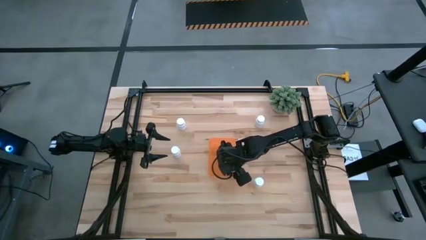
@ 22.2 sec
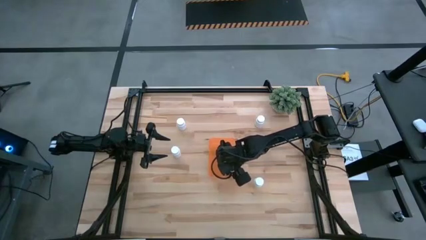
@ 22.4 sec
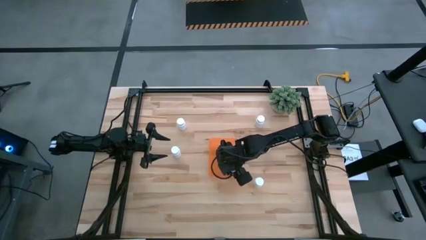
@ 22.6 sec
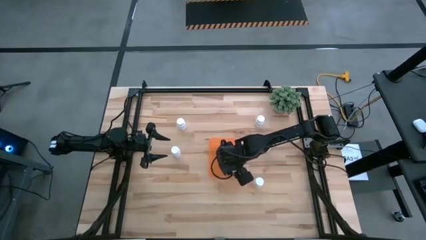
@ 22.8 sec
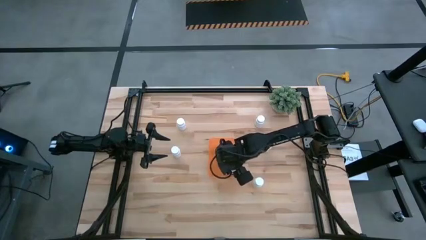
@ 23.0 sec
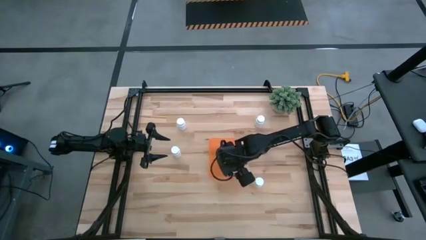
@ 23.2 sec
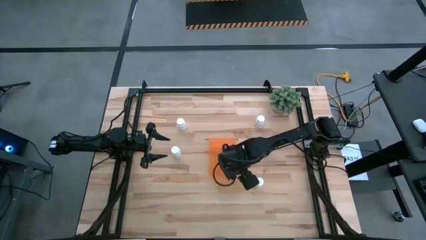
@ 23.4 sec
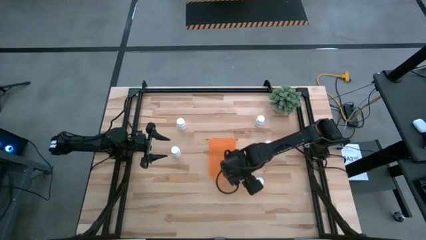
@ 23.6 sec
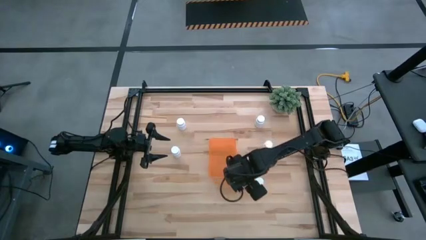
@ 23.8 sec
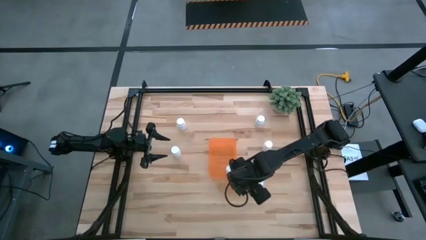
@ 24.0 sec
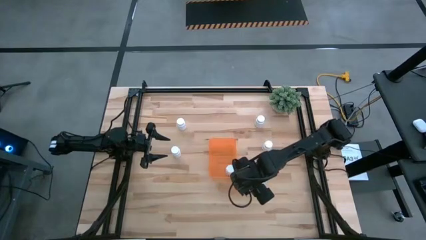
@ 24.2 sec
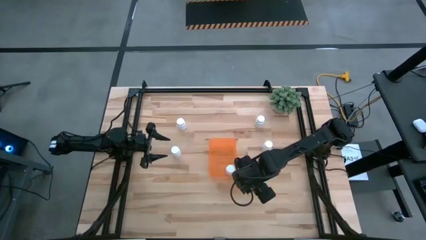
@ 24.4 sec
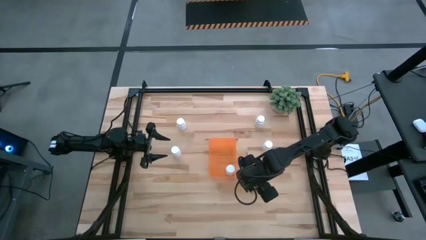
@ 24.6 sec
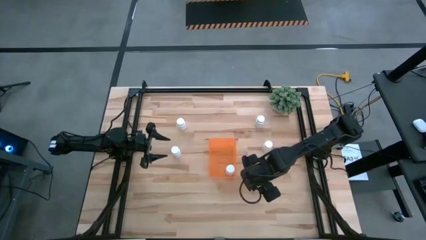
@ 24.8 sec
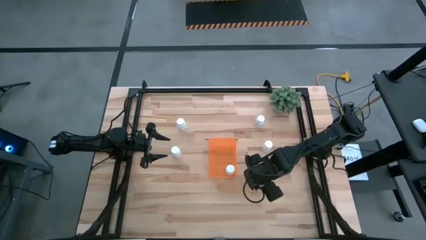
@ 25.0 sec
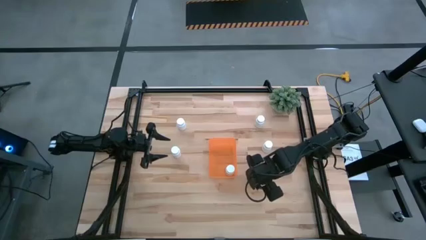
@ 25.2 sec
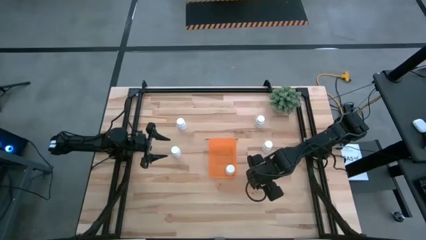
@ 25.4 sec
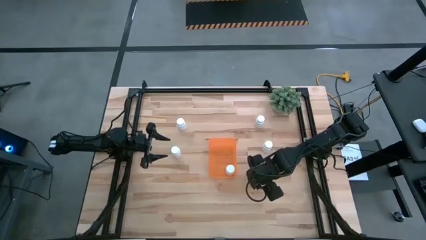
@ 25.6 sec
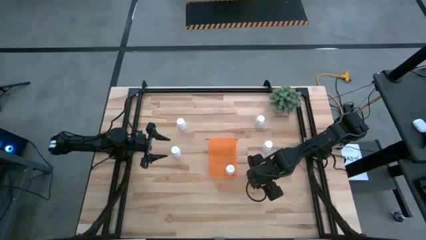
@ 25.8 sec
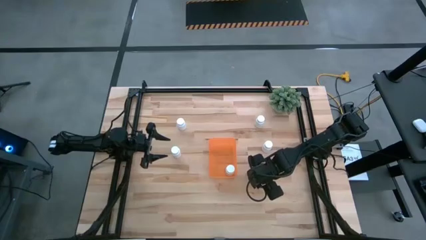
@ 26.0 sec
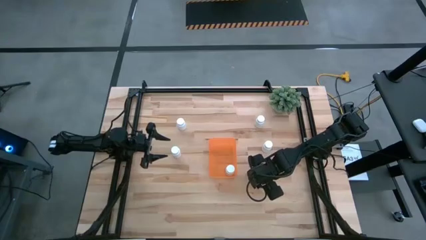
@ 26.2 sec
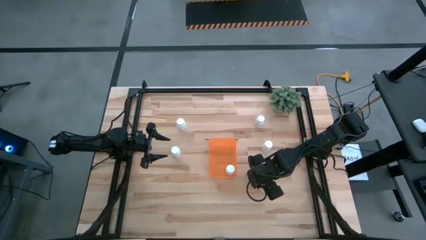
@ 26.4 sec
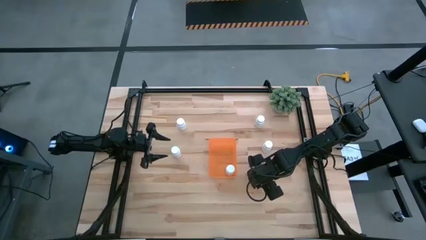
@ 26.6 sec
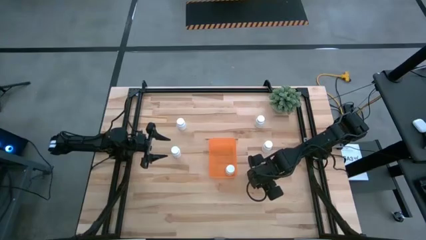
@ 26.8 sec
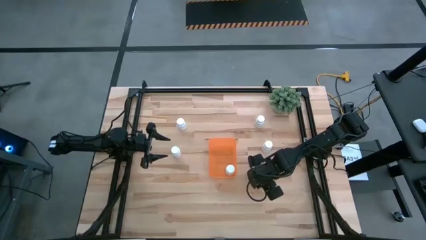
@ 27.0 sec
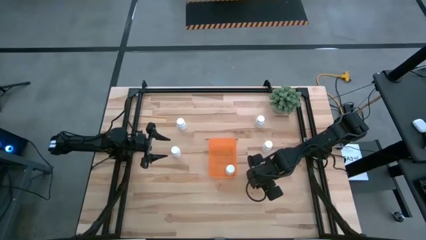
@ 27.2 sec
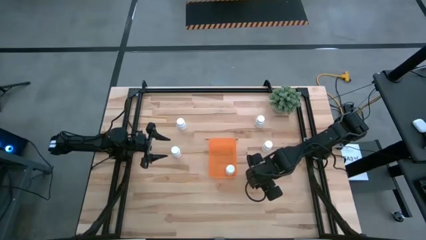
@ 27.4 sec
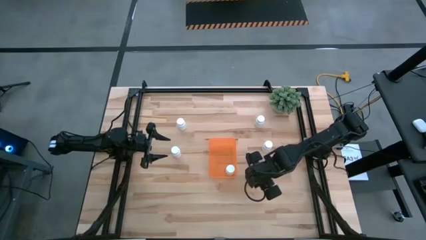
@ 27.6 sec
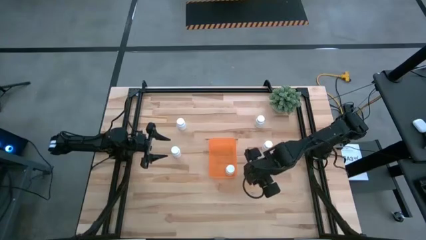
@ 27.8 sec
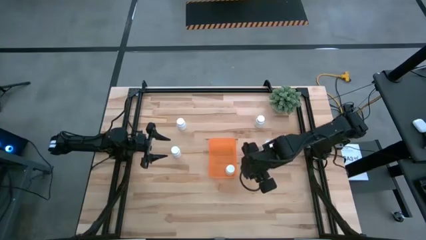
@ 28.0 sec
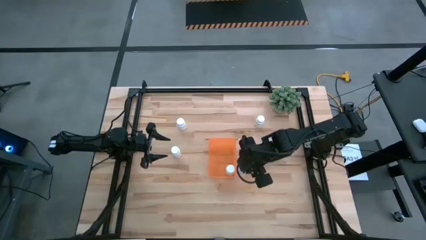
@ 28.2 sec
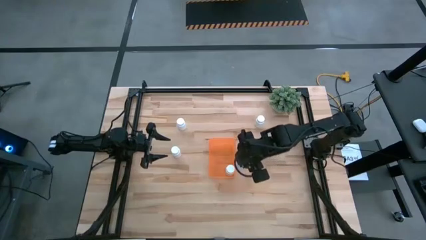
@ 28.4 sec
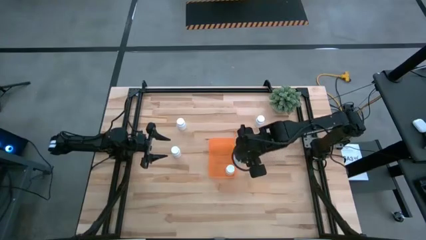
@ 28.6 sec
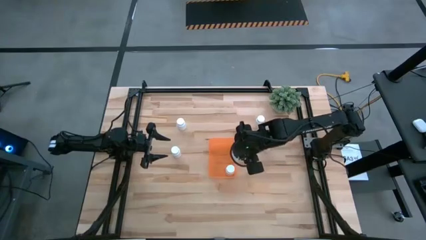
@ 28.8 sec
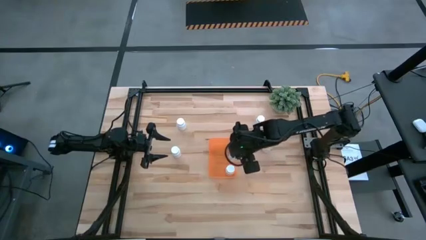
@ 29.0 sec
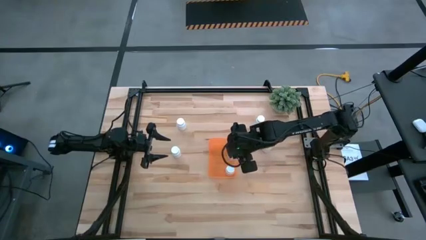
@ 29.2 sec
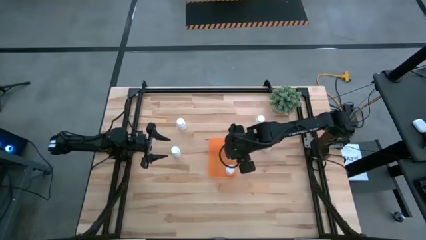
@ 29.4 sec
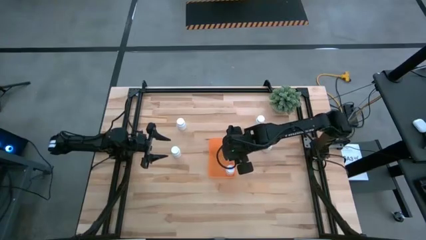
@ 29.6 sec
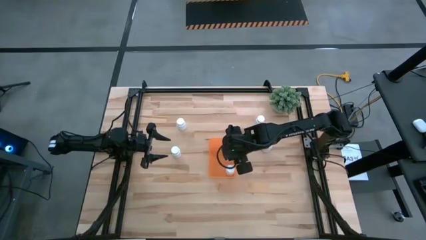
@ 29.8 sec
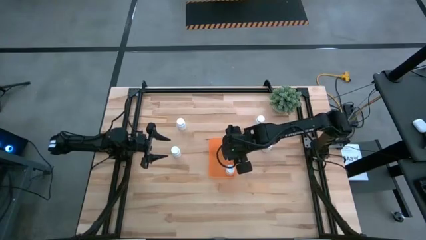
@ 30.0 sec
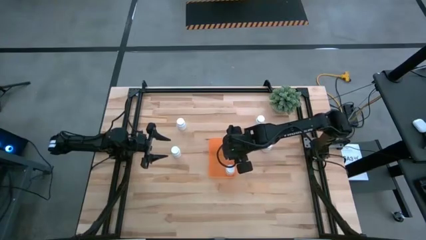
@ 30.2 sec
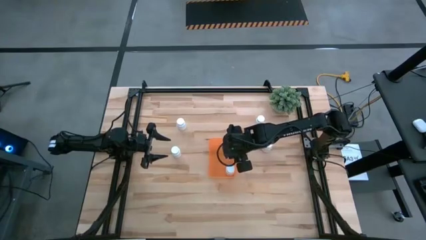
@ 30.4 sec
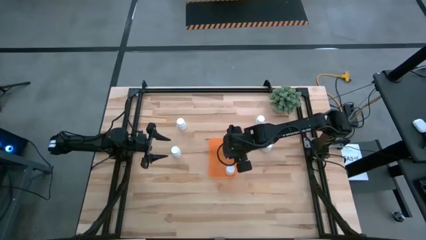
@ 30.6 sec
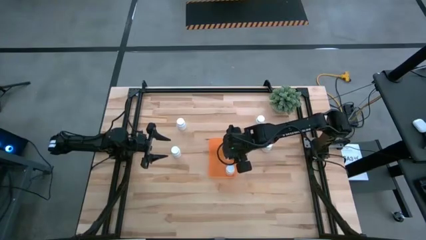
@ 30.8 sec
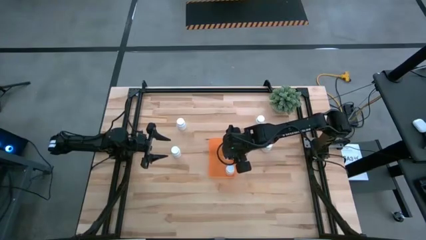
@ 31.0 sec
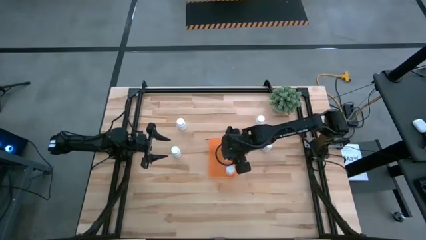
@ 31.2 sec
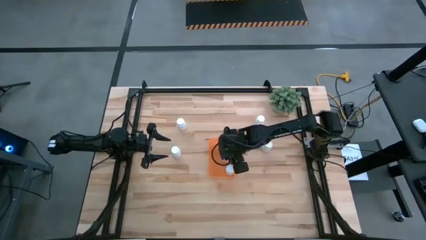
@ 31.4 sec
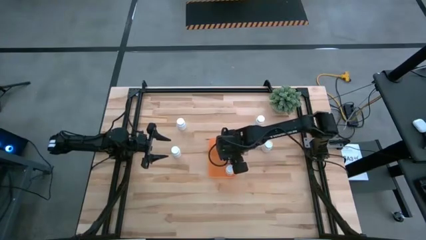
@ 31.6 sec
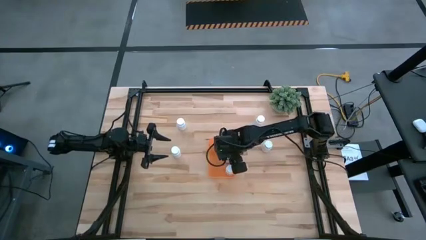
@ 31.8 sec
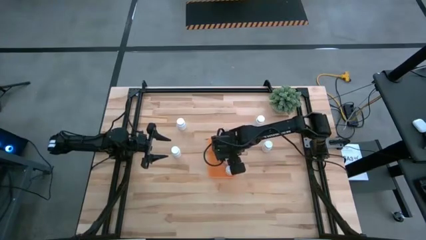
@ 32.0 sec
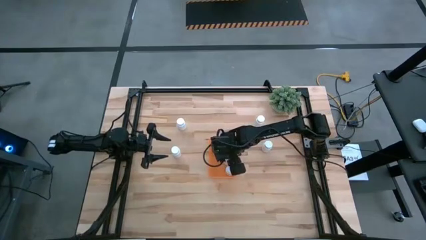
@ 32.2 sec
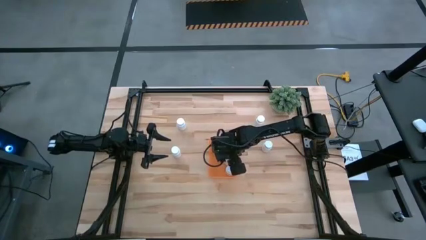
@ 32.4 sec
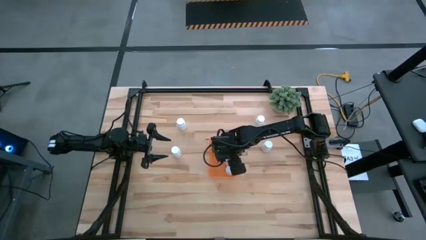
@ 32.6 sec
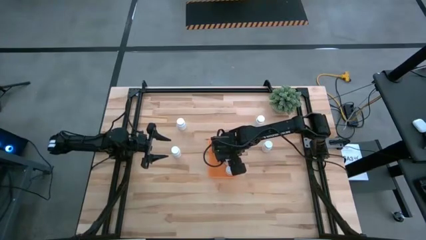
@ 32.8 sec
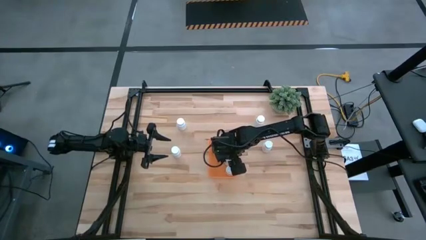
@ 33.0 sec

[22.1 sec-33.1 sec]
Task: Pick and place pill bottles into a basket
Put the white pill bottle into the orange bin
